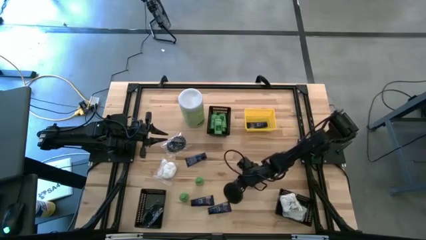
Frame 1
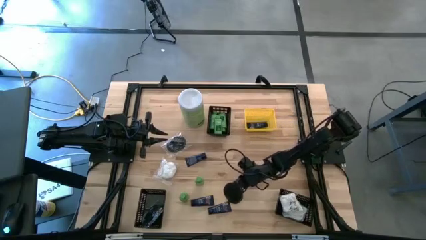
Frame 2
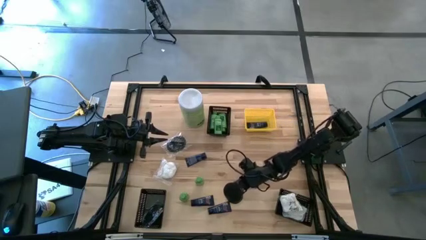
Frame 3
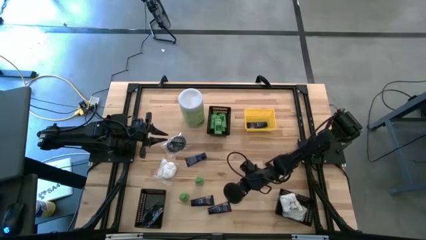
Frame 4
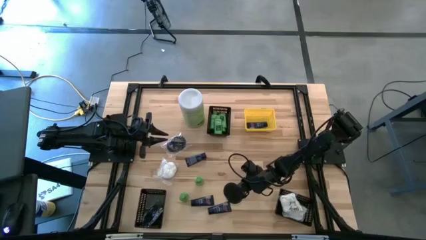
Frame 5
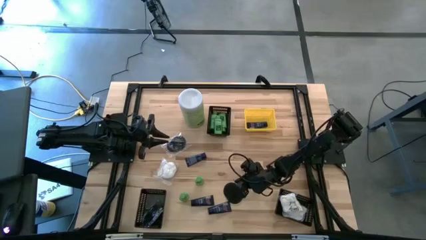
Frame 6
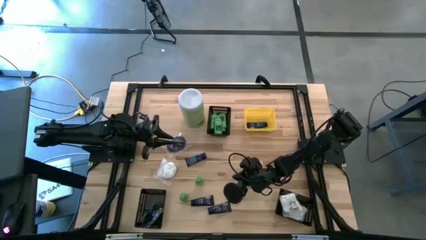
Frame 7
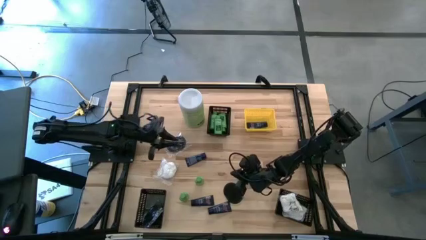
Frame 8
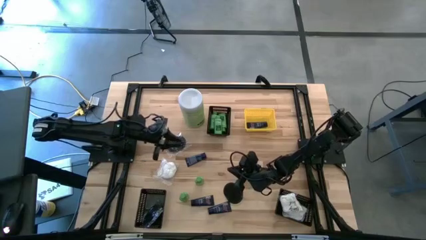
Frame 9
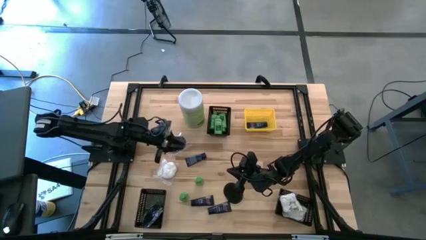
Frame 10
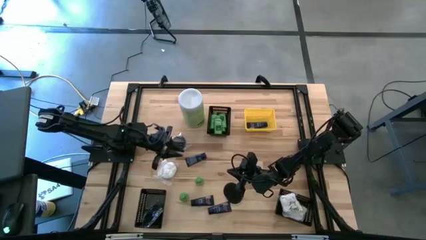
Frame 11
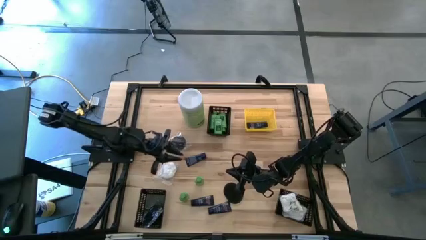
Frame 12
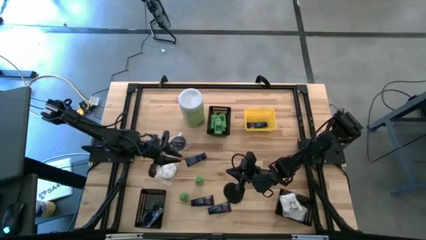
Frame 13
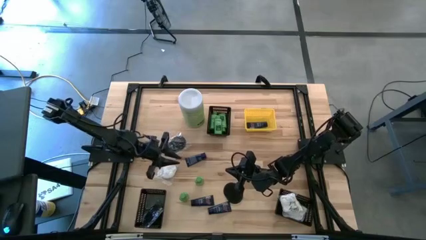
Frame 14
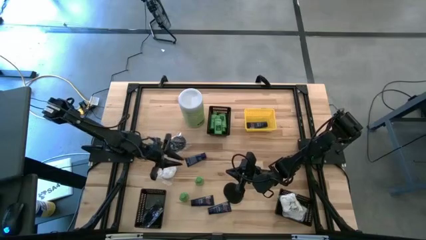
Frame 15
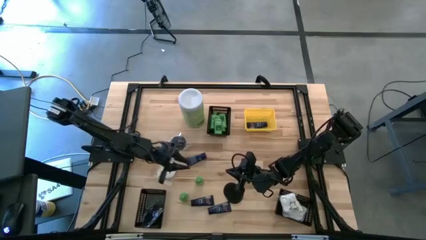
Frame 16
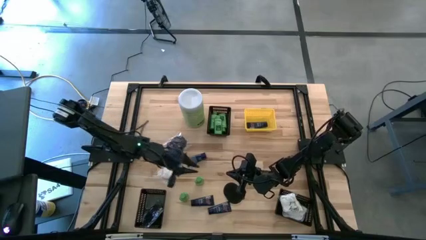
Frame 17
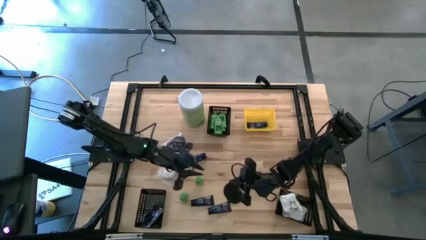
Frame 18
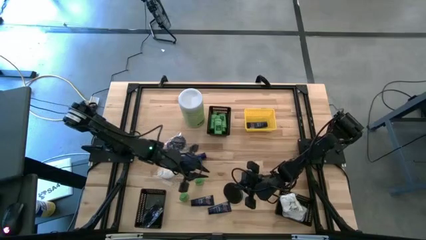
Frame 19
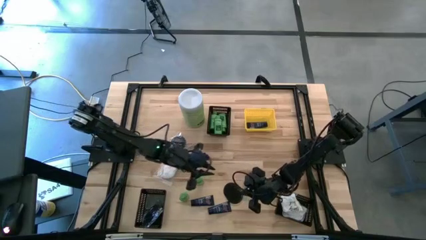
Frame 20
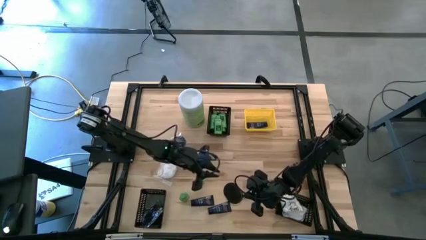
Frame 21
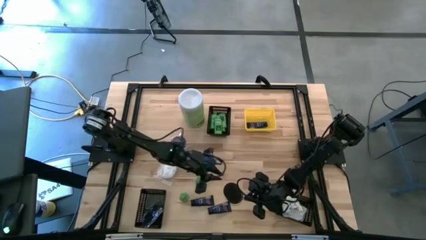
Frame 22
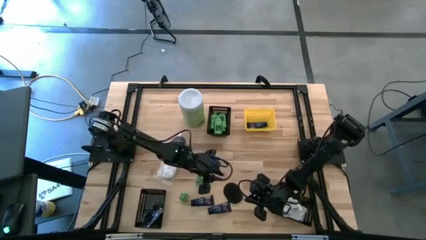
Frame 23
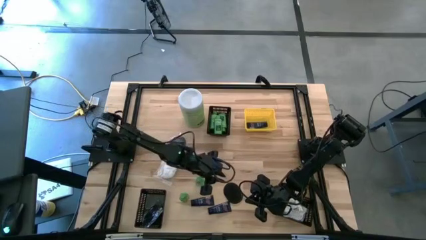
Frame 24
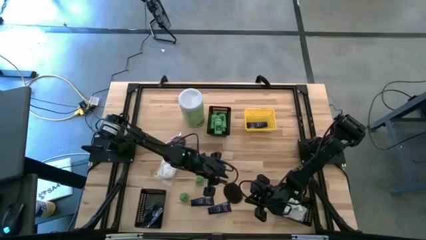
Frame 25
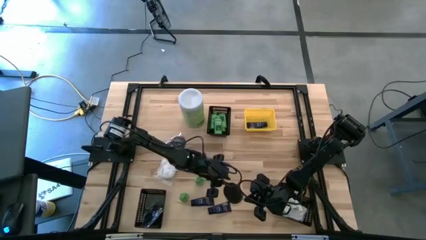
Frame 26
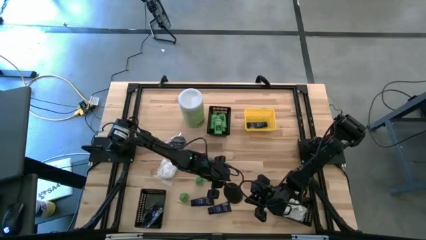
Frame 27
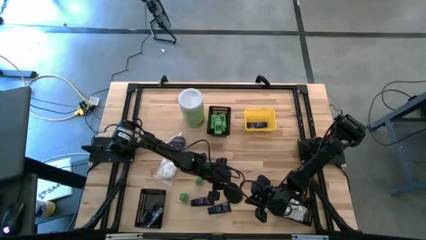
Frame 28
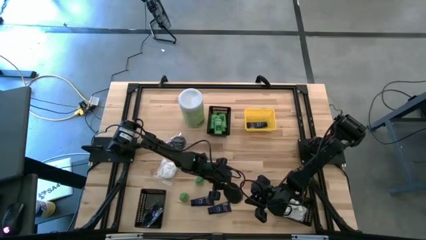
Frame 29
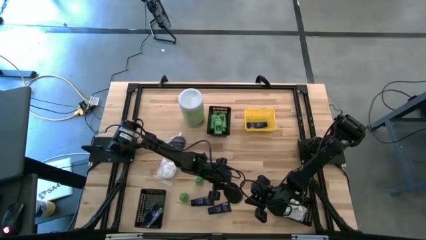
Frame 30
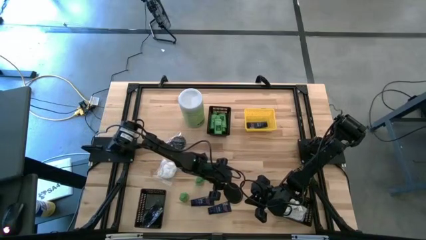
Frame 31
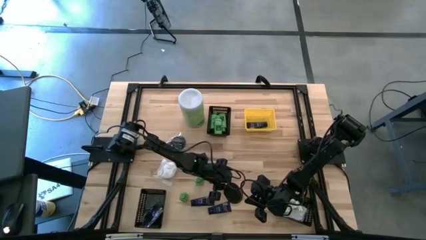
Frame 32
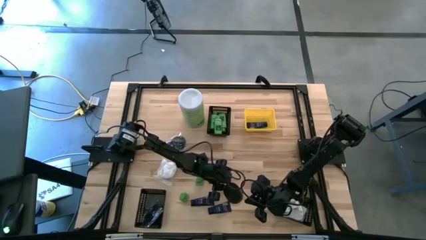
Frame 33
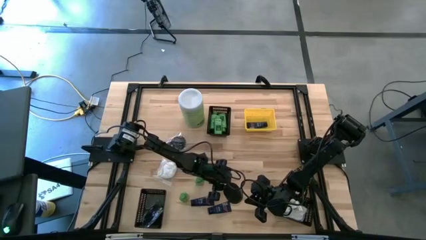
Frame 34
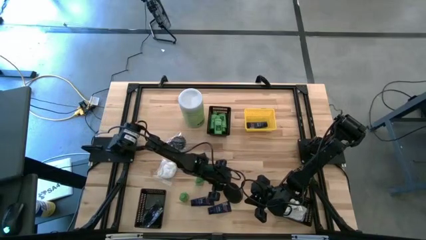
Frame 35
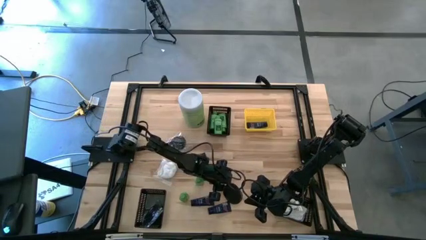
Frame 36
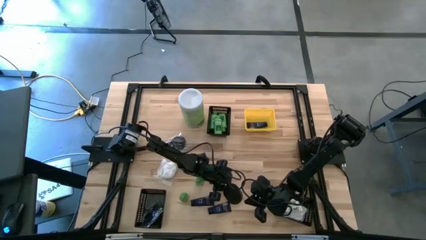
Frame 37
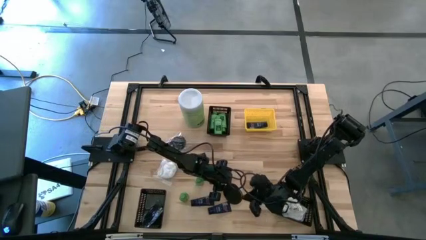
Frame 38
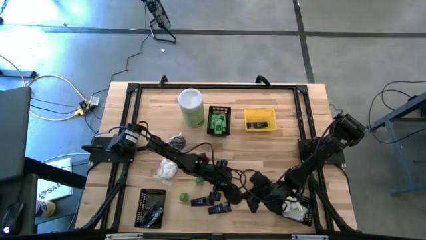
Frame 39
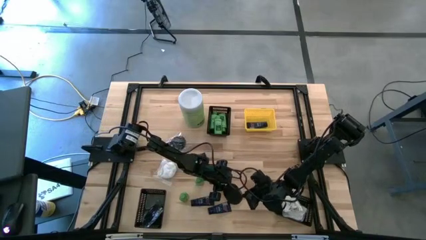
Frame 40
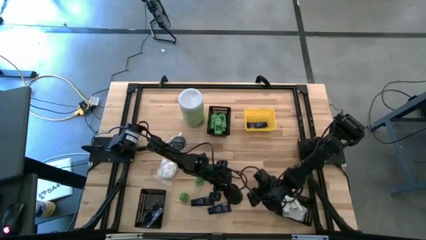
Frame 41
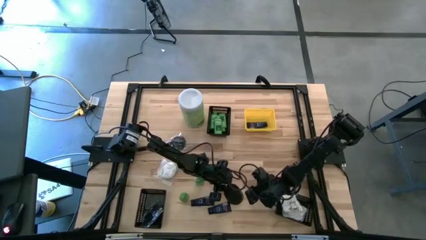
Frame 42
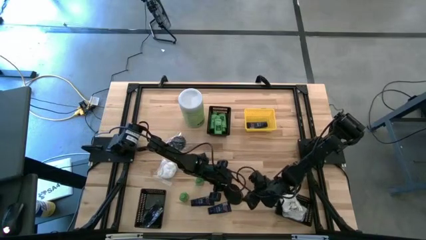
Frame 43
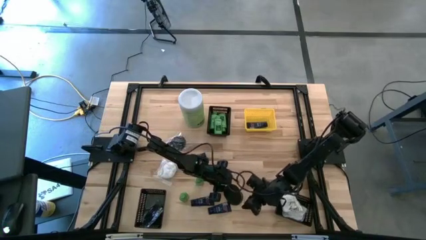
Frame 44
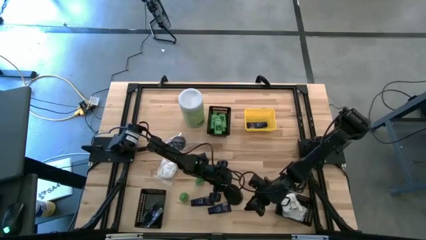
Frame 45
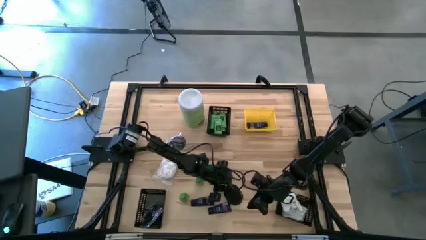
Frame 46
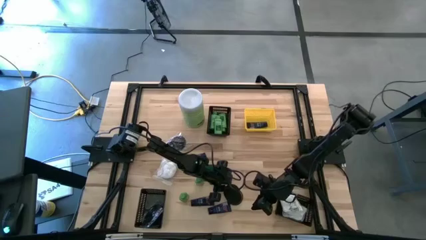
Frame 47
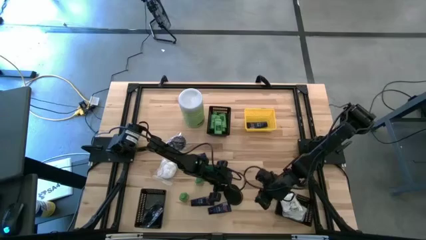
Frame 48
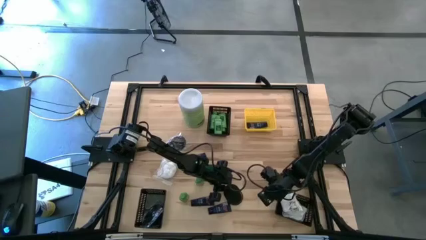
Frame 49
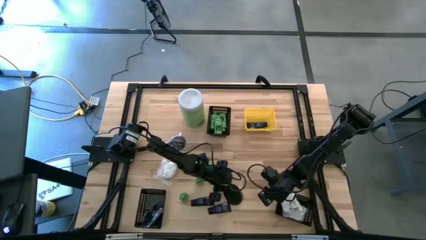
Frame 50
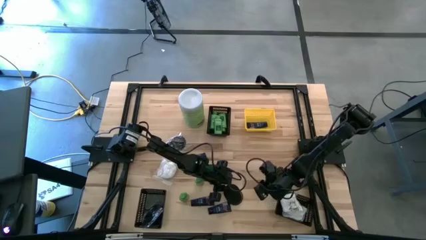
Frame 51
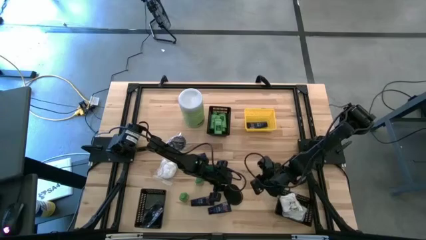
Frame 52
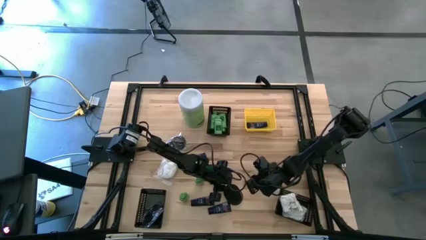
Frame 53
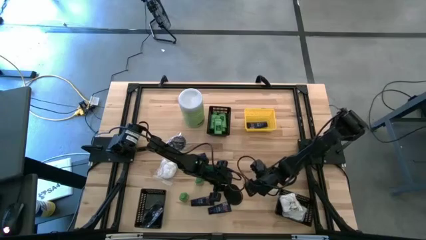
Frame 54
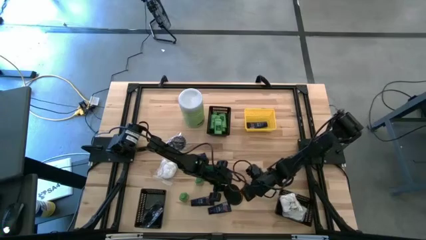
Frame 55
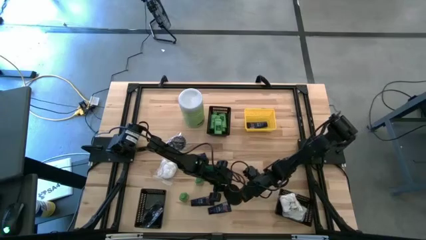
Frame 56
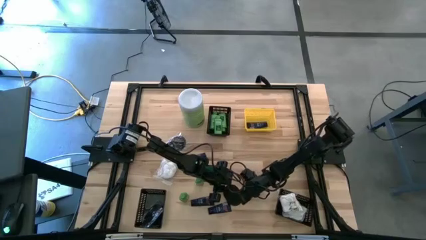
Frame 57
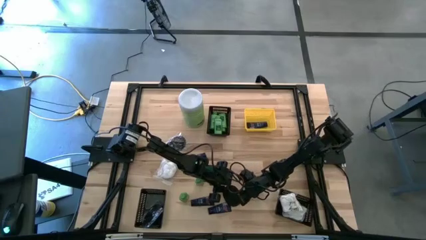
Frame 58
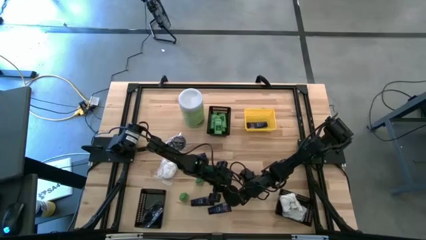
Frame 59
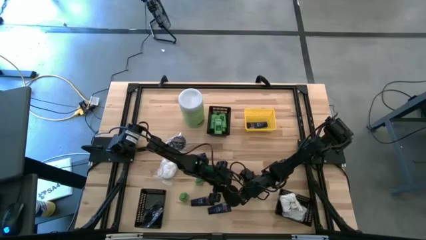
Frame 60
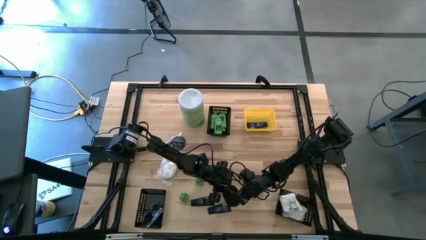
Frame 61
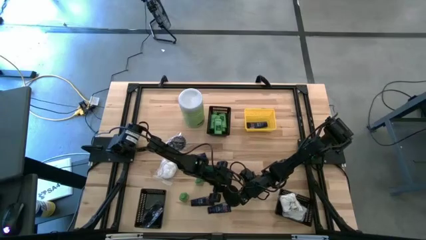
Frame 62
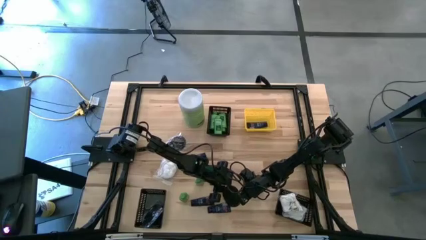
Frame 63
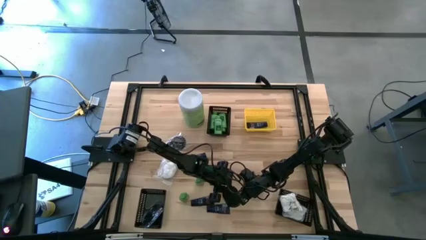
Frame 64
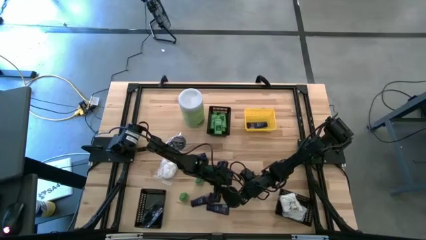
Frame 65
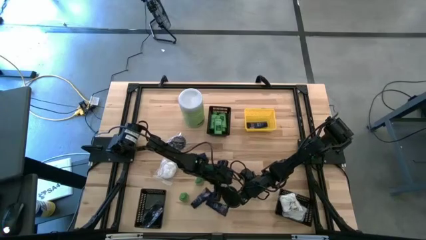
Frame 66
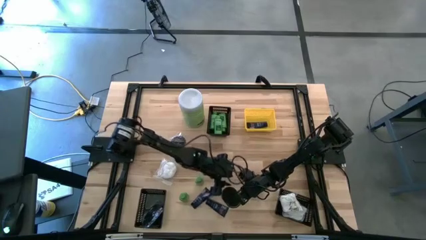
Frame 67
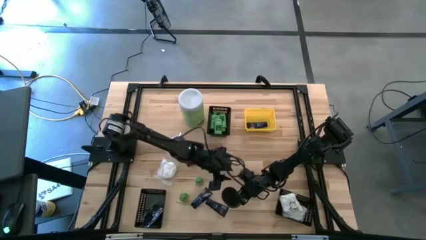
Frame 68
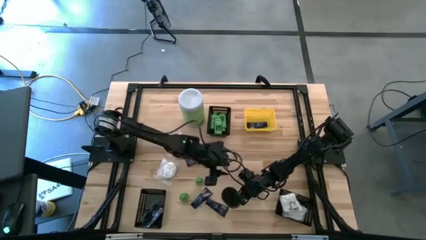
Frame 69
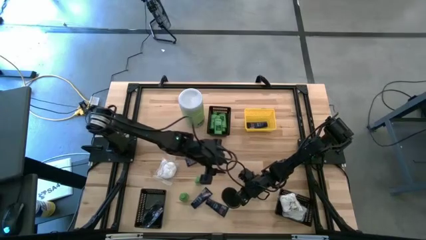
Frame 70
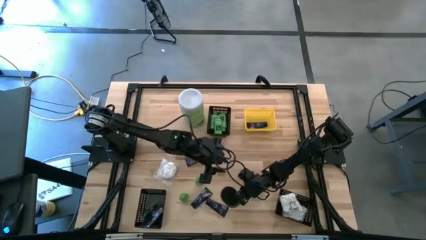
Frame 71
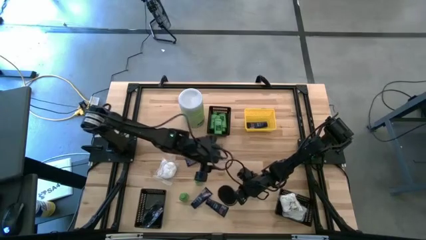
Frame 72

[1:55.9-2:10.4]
Task: Pick & Place Travel size toiletries
Put the black hair brush into the bottom left black bin
